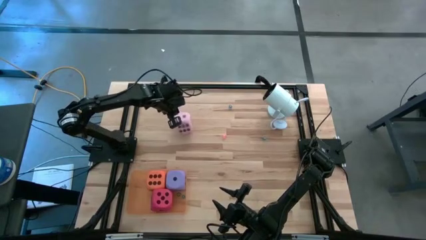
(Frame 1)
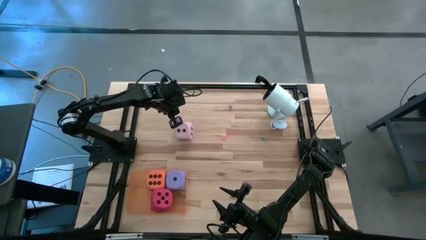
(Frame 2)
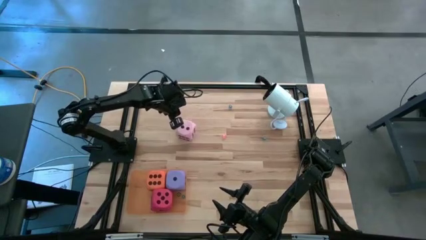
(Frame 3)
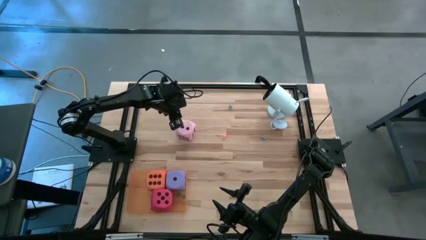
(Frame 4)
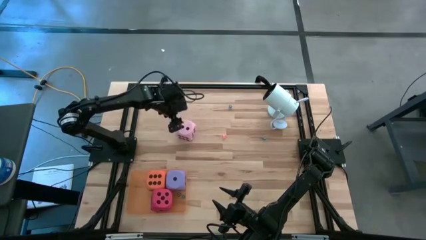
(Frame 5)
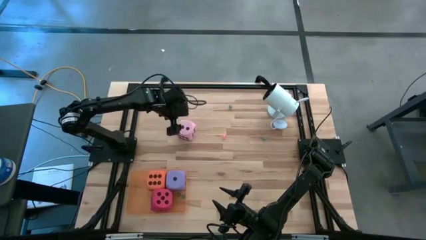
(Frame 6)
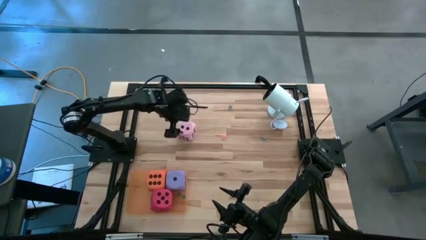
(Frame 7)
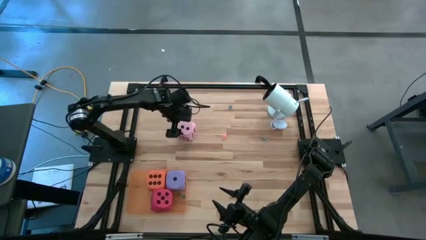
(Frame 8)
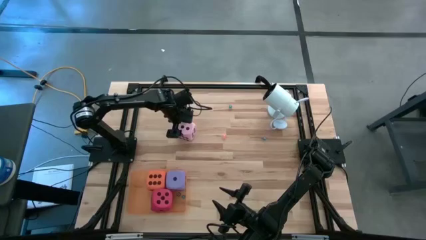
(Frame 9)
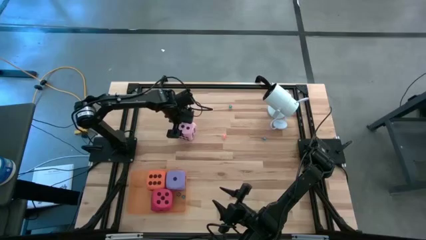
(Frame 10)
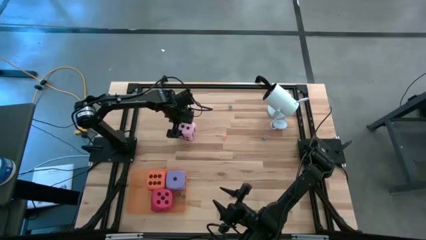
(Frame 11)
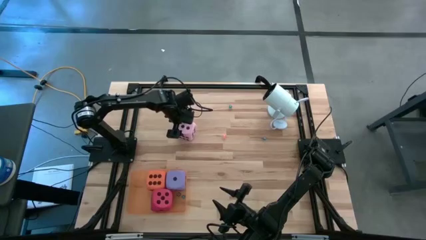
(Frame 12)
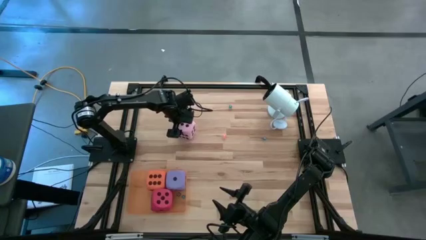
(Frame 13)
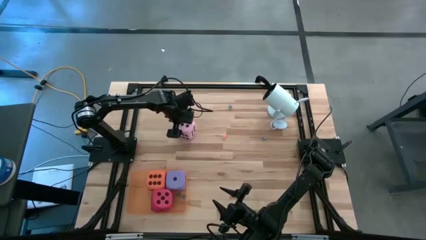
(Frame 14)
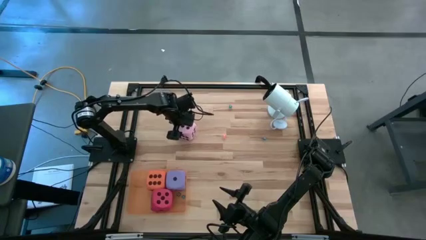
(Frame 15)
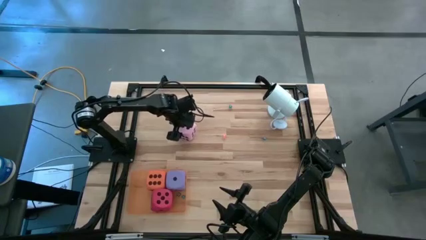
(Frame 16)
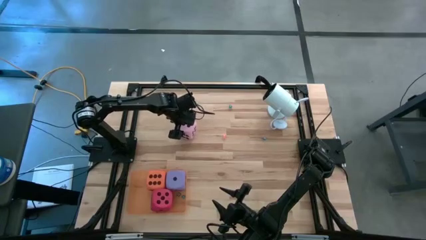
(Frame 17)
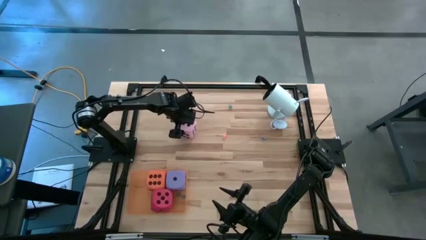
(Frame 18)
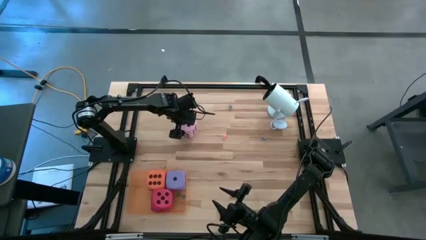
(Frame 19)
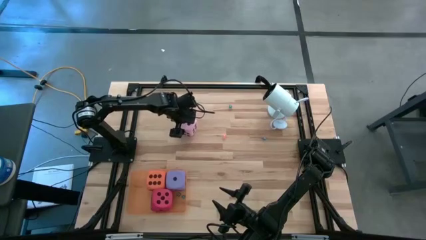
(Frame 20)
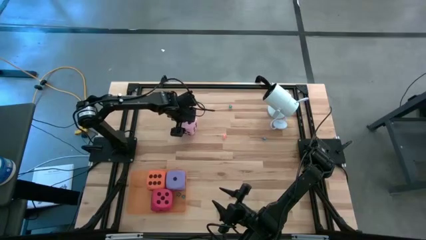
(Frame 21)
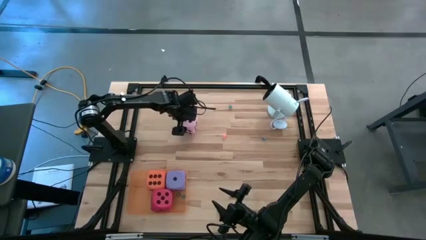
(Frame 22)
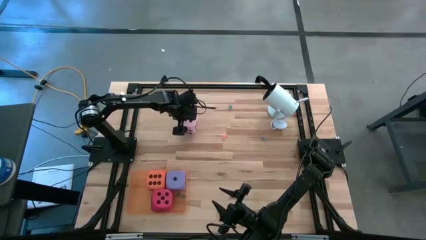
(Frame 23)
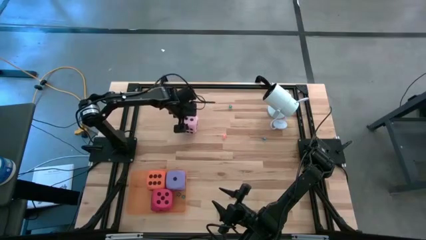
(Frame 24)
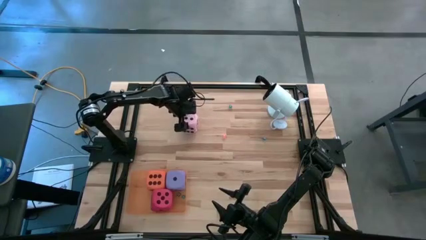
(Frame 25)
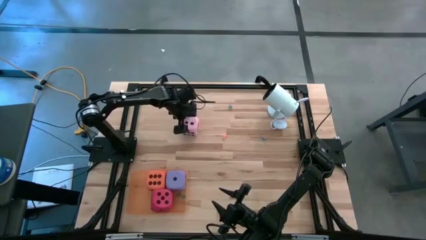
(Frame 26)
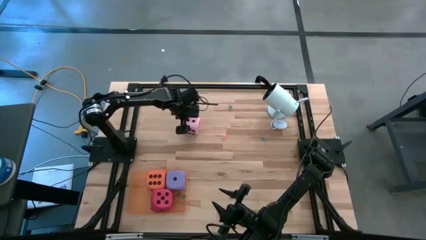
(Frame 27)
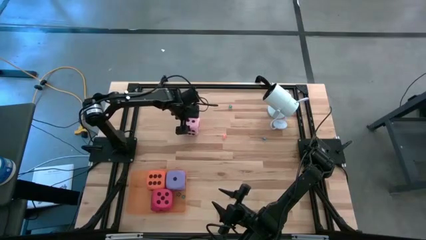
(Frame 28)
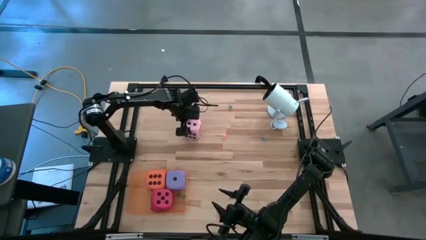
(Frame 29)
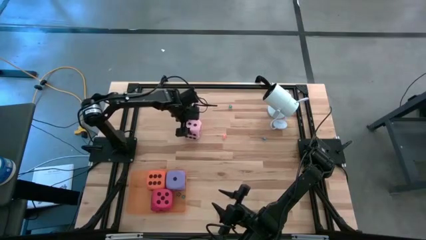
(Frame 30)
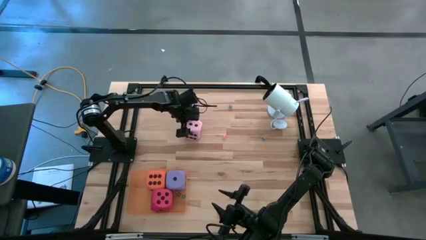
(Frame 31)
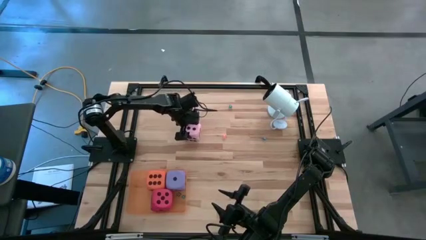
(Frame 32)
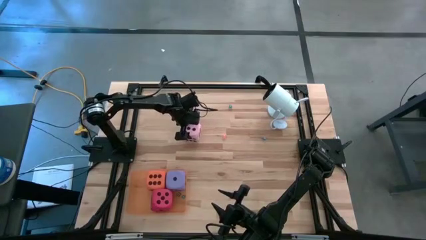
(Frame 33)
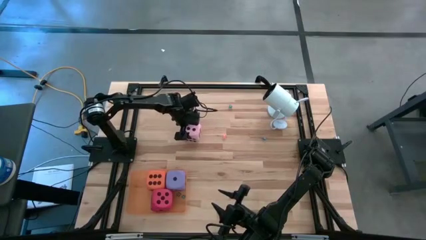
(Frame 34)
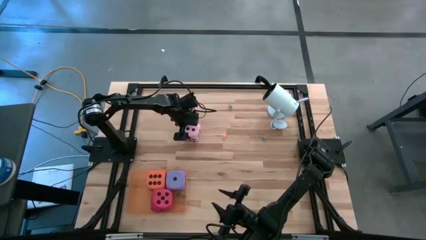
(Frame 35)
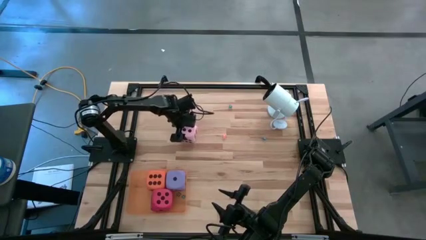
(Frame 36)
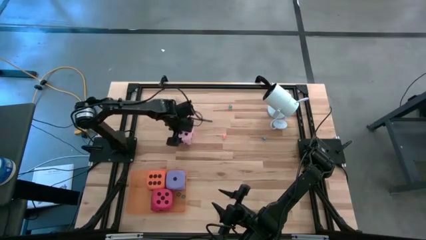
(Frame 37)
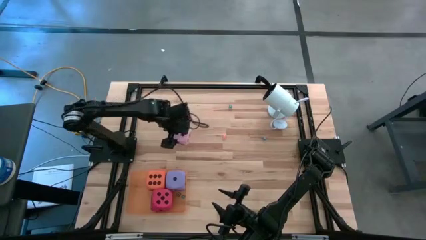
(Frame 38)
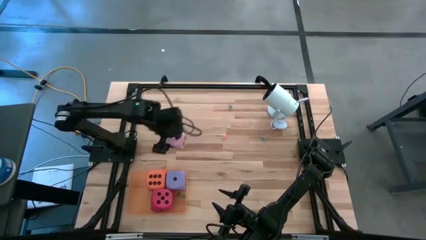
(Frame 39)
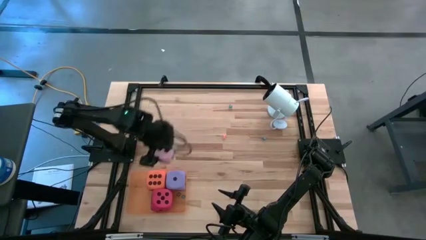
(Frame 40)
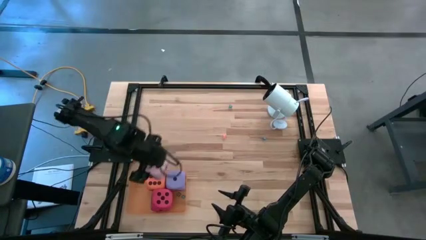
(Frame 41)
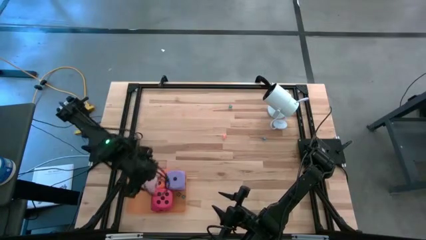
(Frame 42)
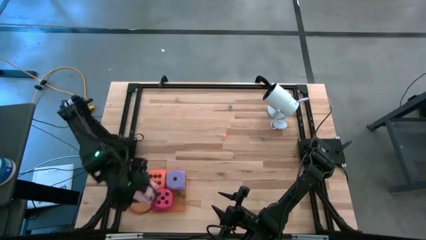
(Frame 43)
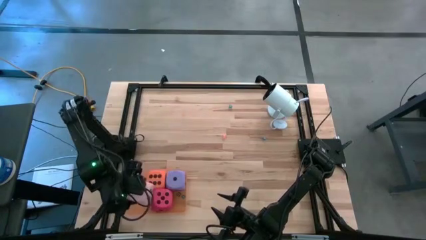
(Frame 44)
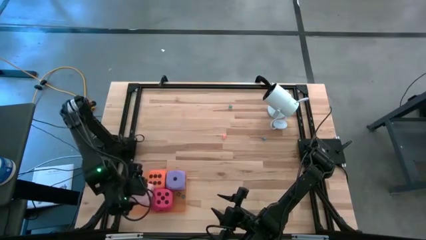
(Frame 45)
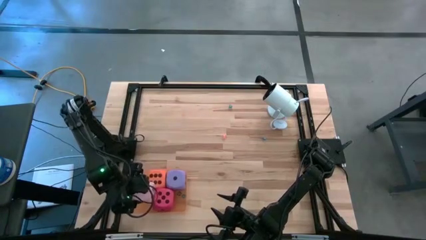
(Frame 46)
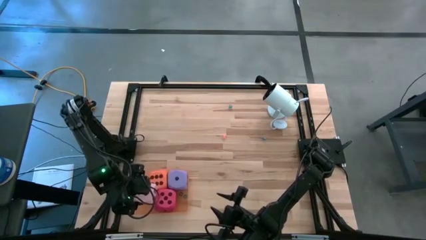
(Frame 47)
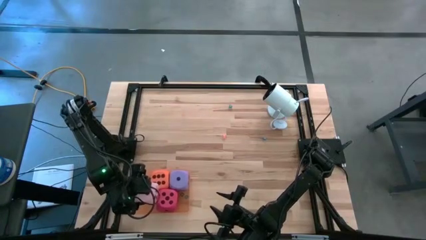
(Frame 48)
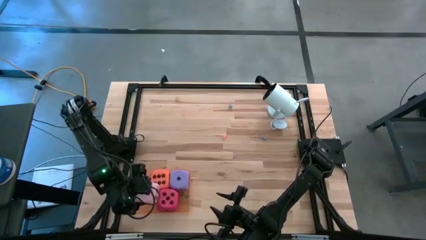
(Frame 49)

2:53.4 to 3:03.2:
Task: Pick & Place Dice
Put the large pink dice into the orange bin

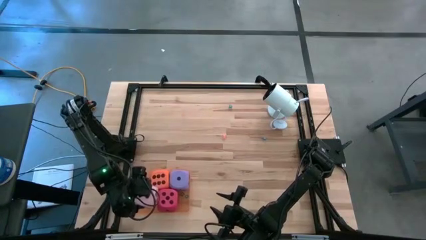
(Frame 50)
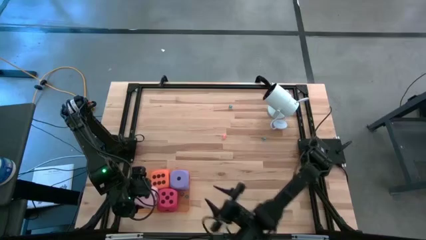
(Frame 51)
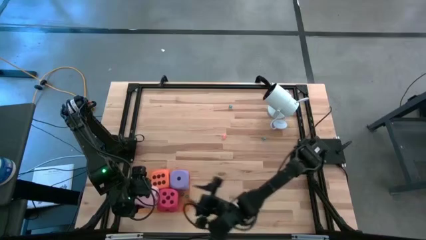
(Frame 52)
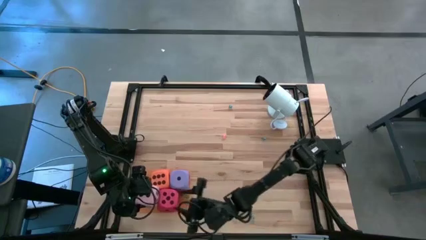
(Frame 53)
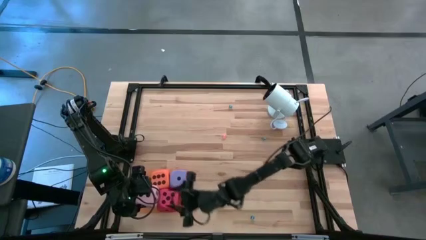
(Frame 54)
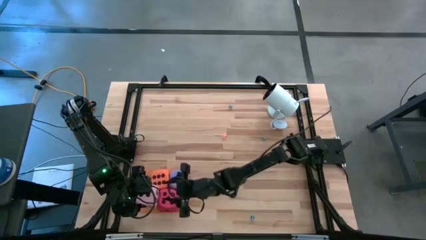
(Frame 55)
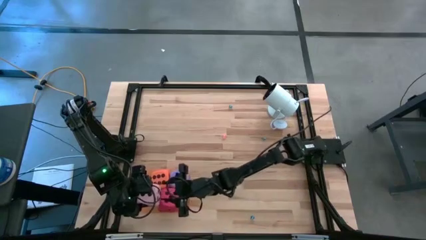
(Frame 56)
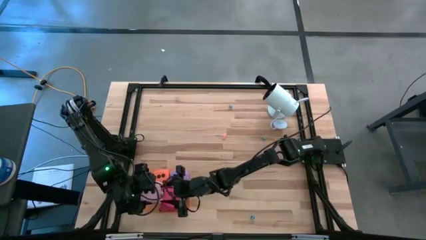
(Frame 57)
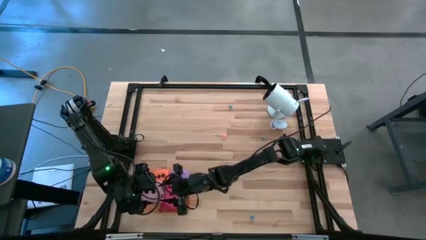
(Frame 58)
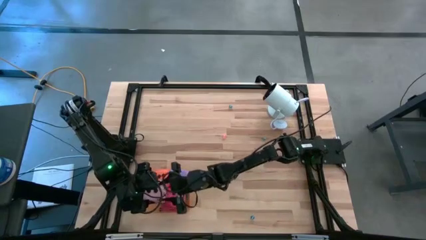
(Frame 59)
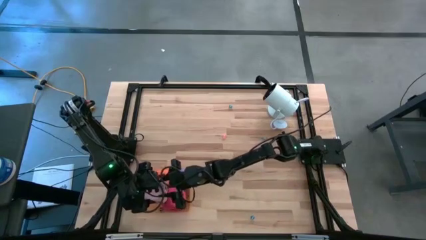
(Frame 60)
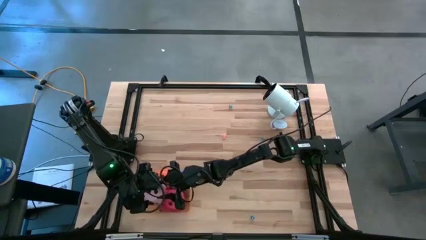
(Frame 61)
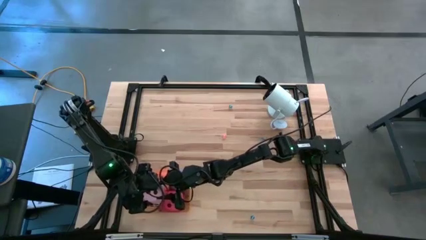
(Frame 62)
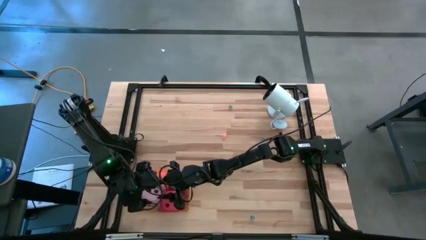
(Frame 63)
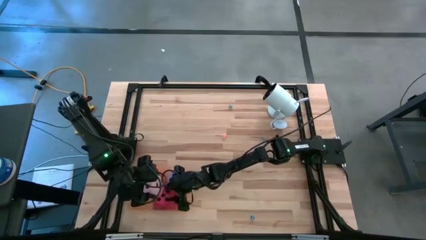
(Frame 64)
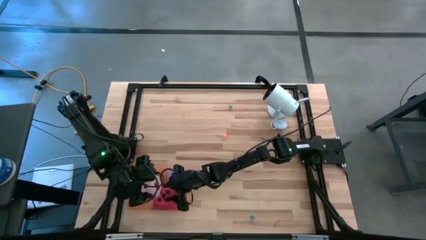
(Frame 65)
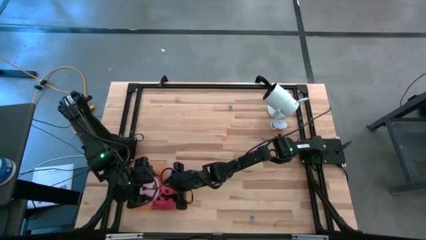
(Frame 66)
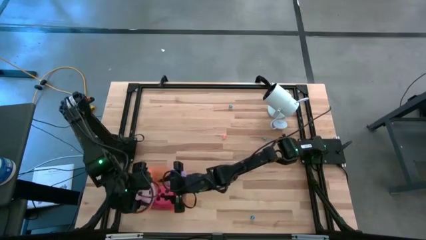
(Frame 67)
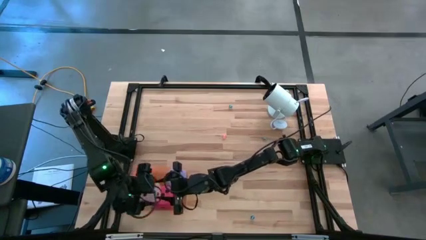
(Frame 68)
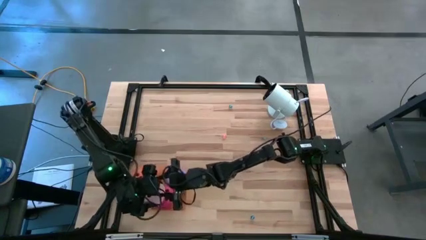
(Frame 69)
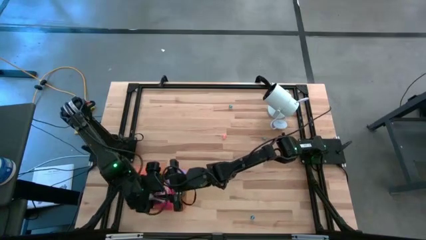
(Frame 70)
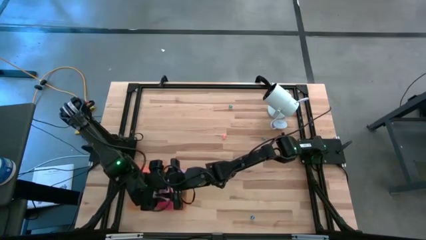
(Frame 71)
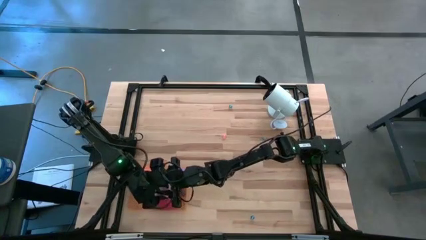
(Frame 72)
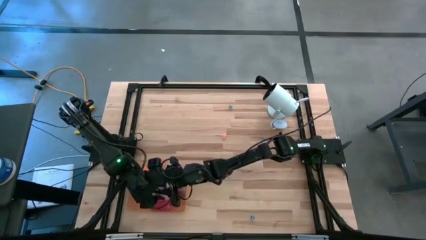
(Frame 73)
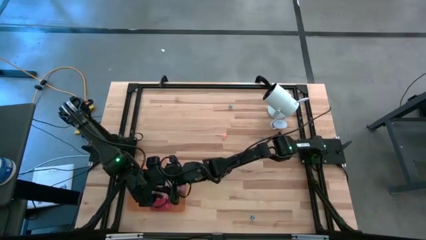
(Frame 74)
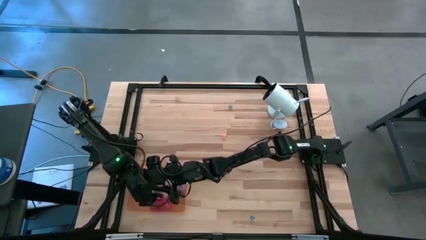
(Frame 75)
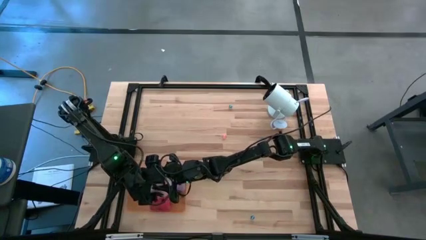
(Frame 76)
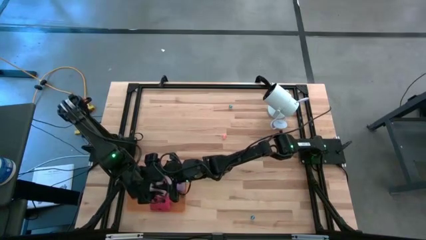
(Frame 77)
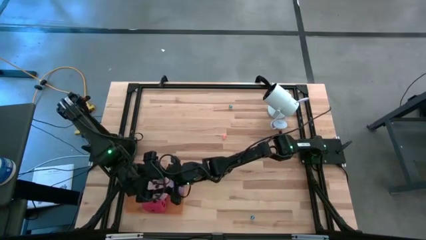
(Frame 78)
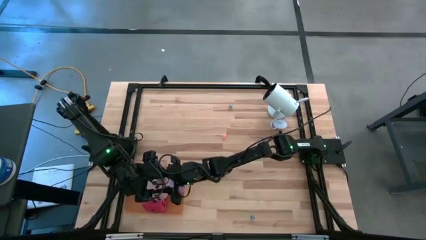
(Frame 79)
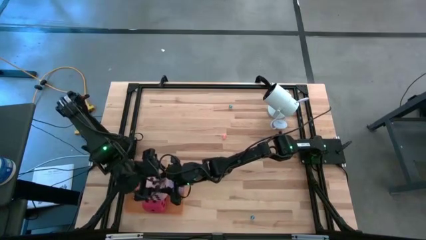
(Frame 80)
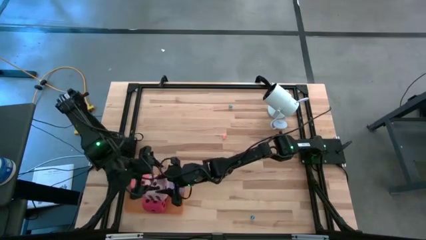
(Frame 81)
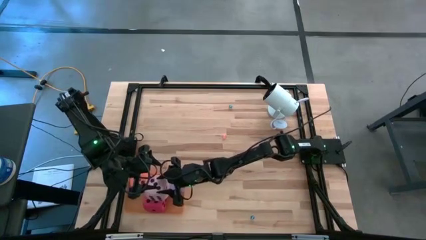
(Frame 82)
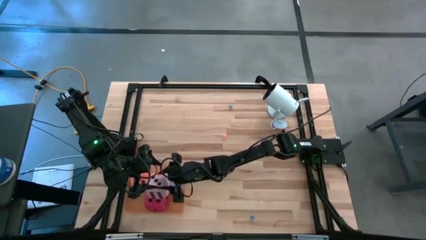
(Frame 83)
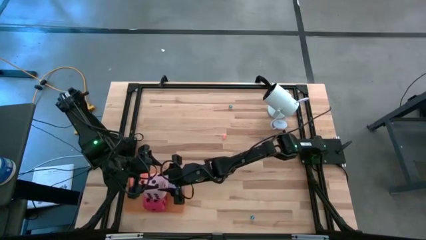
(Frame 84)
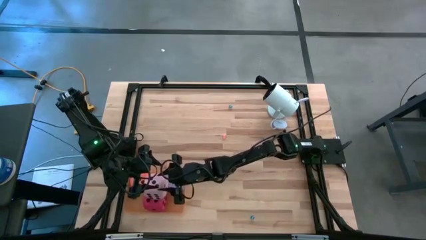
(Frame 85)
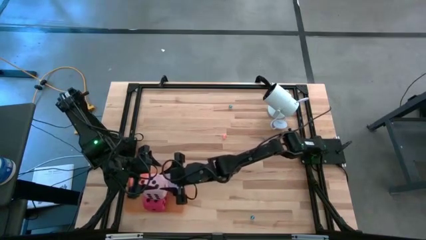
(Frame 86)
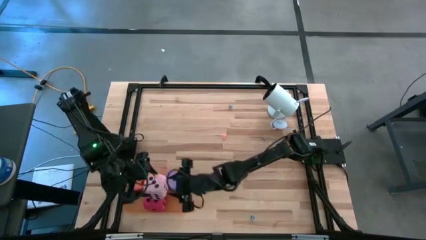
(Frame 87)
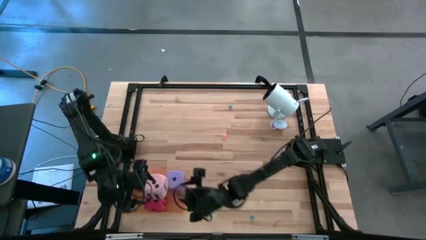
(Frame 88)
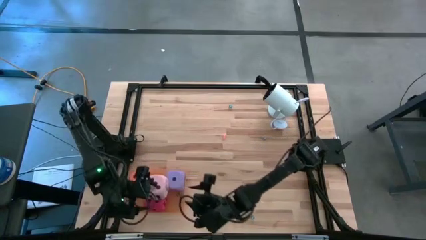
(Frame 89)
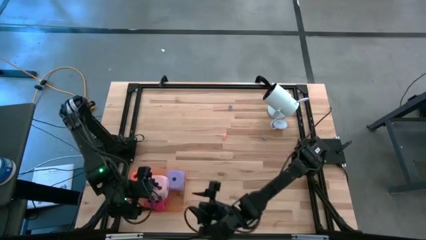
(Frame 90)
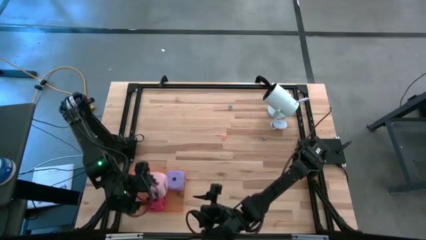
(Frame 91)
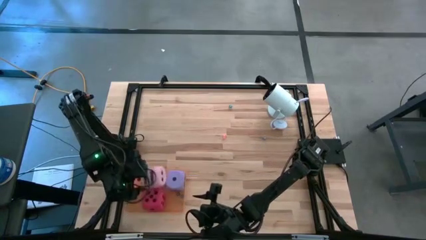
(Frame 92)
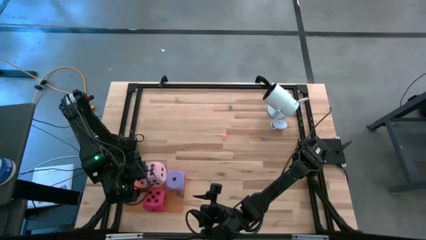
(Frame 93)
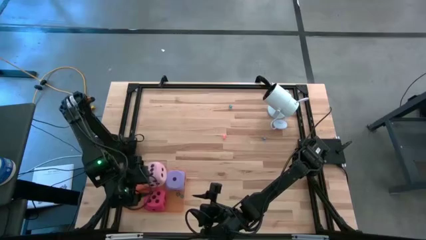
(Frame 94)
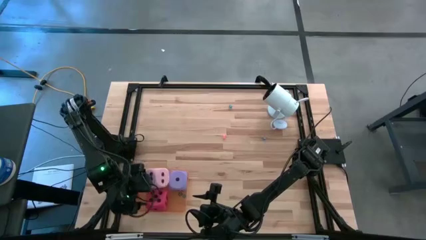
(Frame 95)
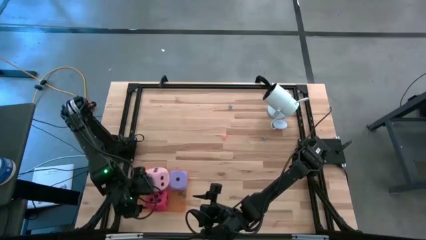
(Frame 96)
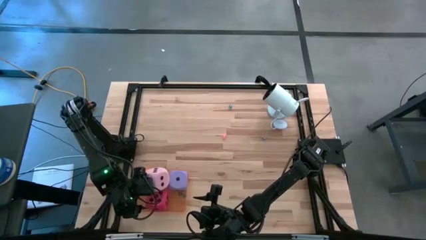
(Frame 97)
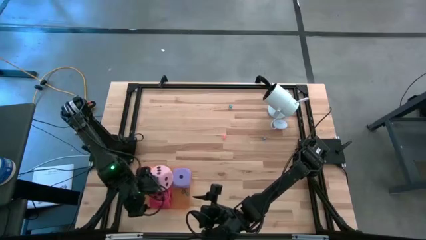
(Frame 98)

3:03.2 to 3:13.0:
Put the large pink dice into the orange bin
